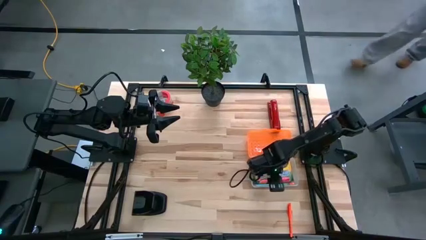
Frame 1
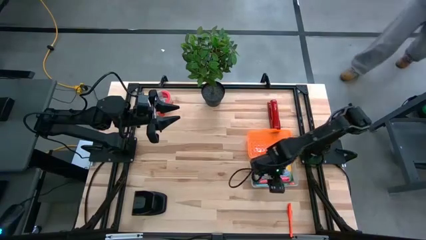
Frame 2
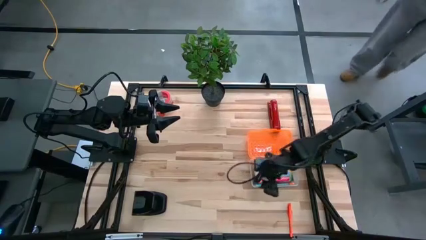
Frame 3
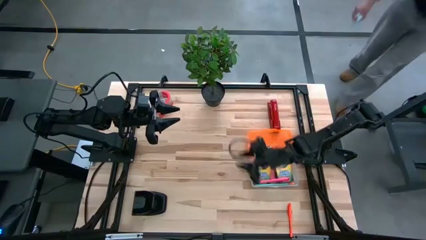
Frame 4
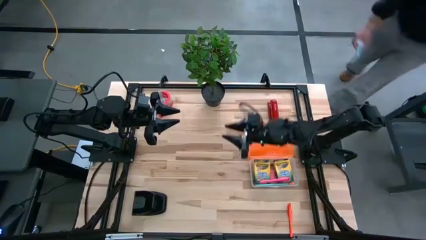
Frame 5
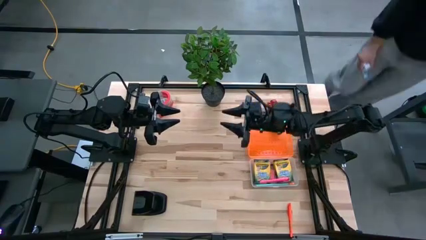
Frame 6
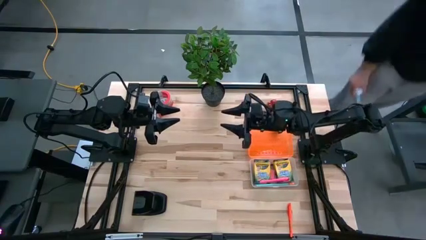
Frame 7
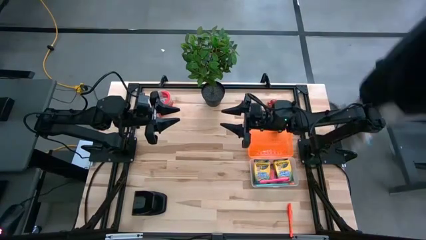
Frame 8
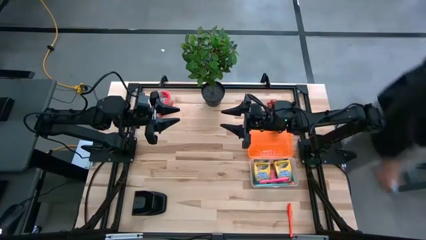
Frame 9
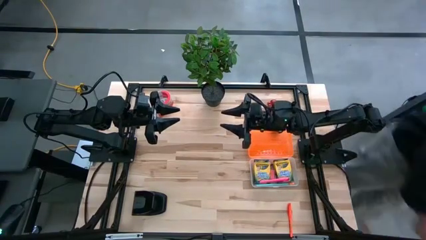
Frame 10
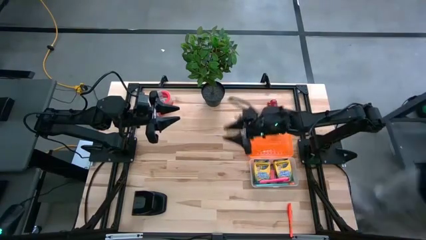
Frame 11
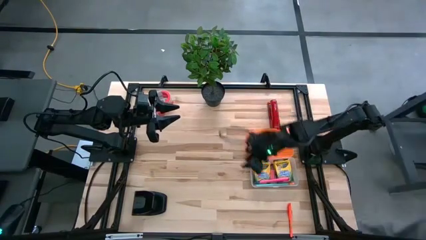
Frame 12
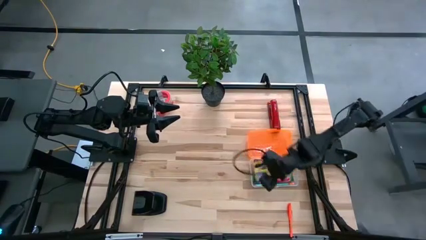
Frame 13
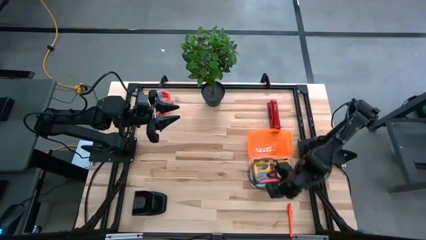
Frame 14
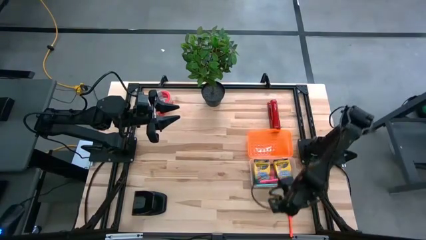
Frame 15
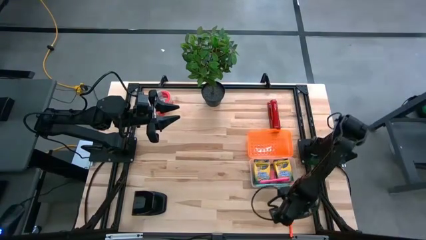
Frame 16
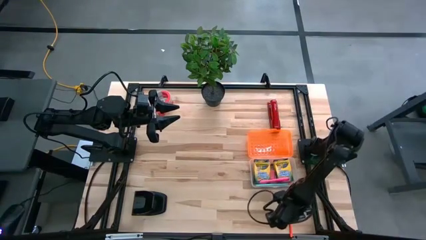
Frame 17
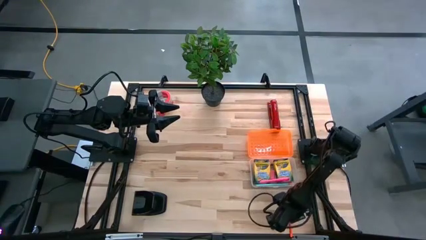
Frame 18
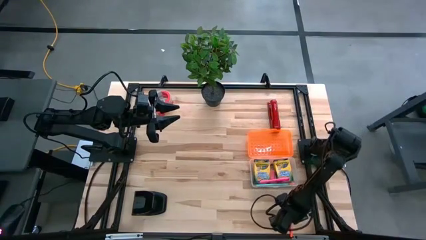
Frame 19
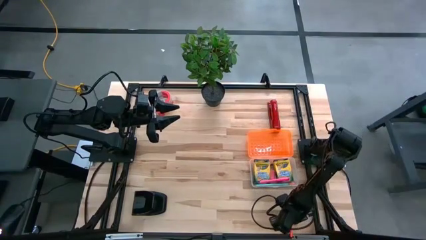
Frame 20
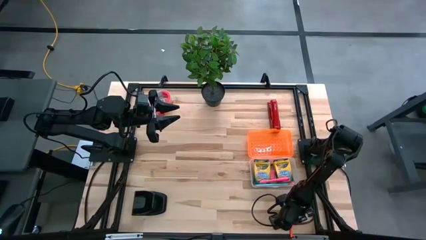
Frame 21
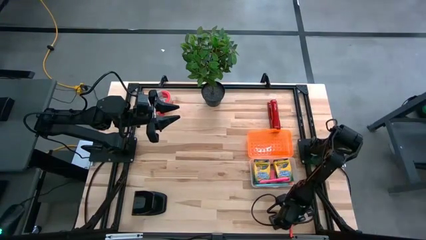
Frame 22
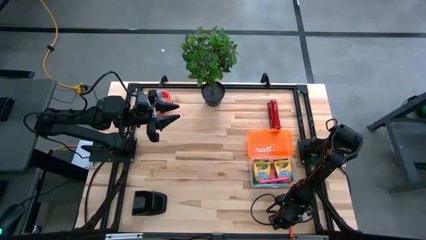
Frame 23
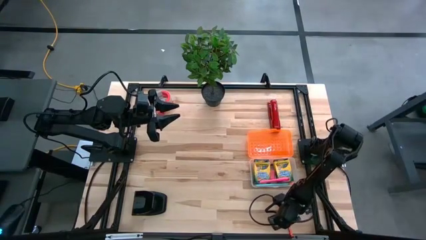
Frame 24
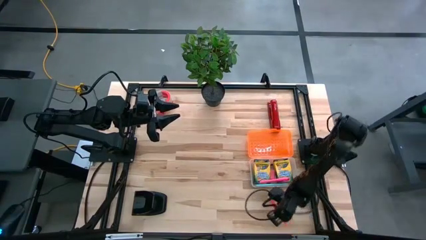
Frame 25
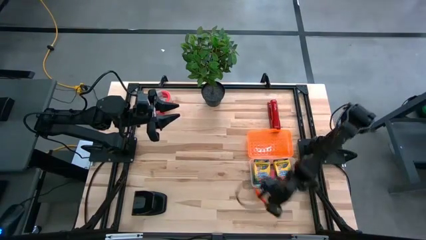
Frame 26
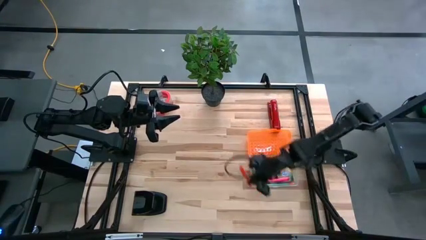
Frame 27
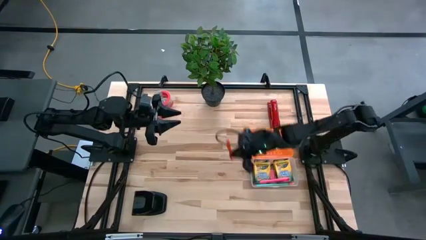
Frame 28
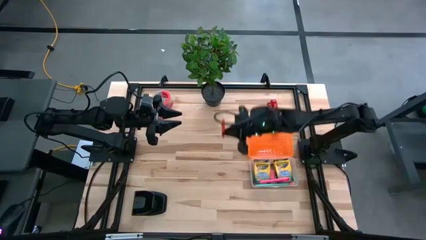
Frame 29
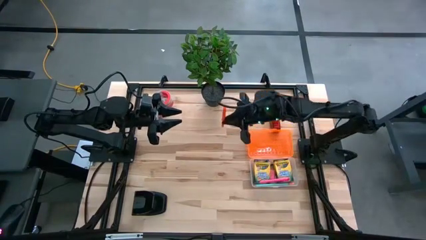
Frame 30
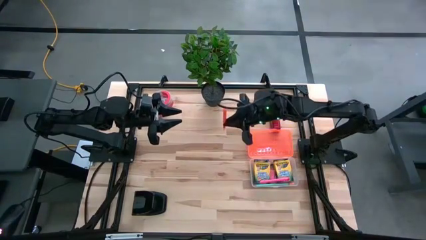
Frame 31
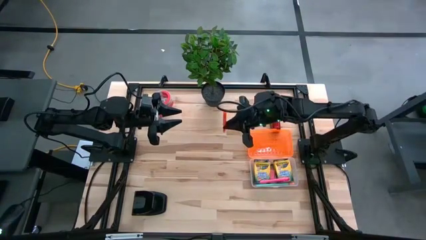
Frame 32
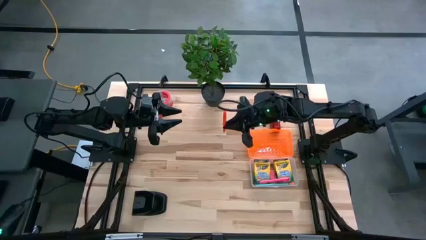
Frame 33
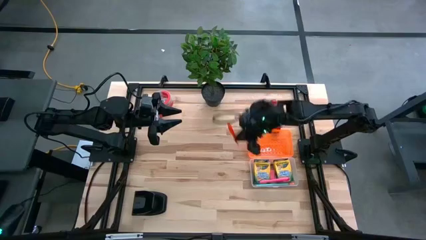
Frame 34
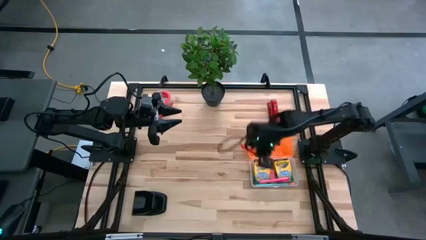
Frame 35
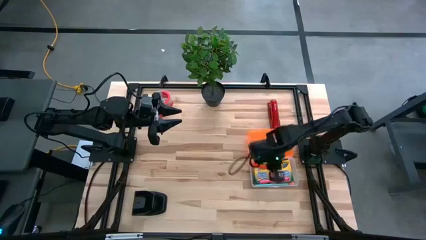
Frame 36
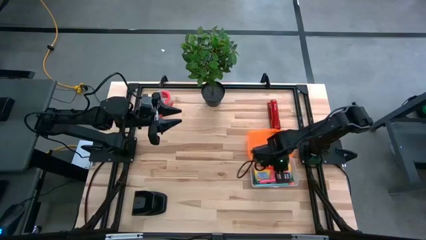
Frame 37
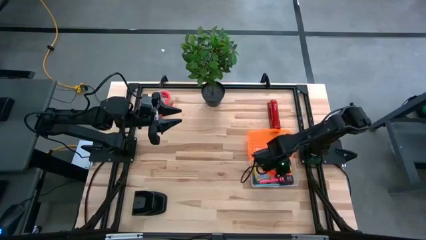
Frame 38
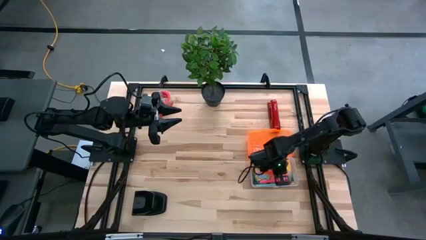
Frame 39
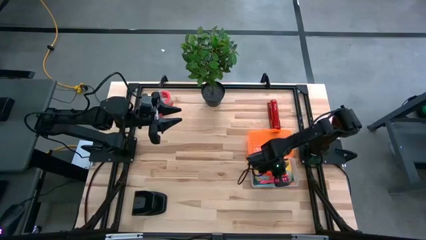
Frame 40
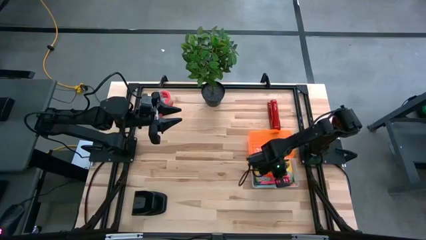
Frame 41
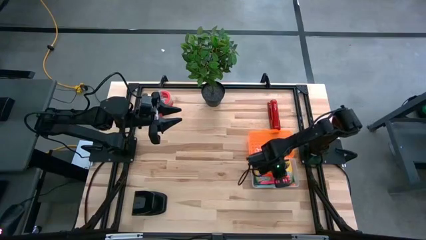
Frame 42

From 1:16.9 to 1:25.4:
Task: Pack school essentials
Put the orange pen into the orange supply box

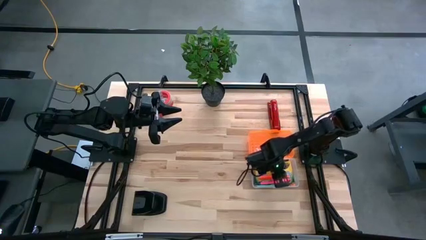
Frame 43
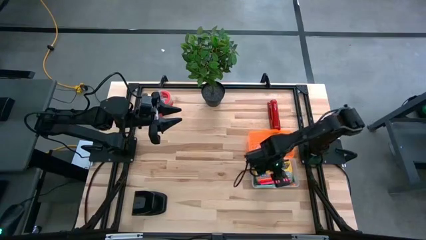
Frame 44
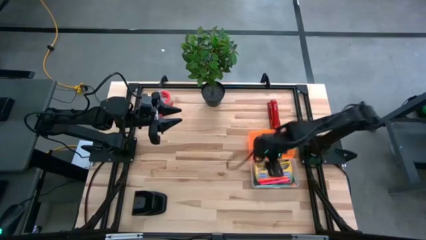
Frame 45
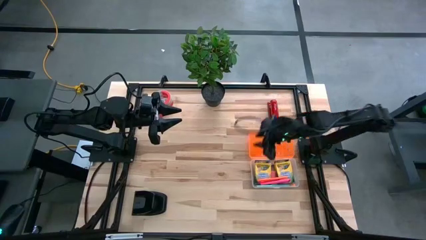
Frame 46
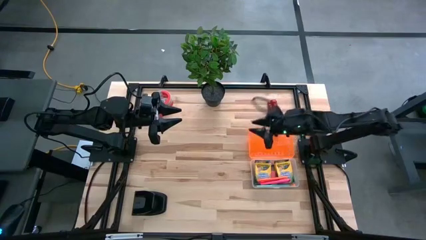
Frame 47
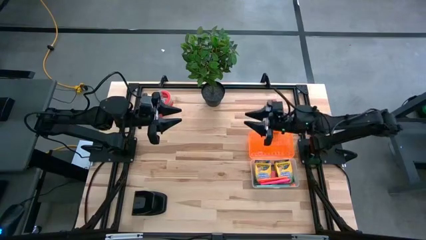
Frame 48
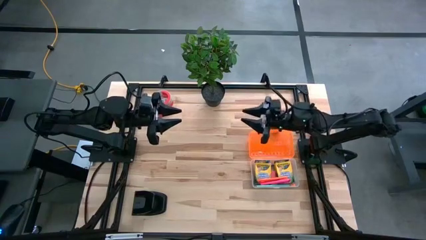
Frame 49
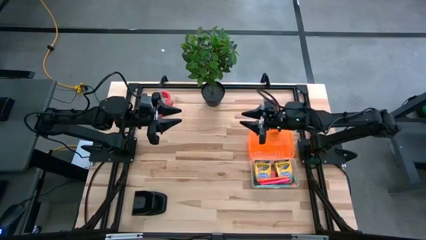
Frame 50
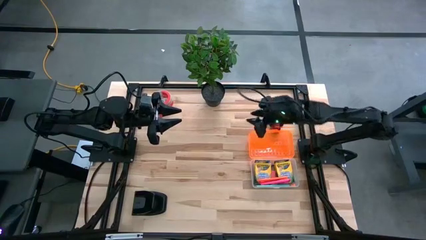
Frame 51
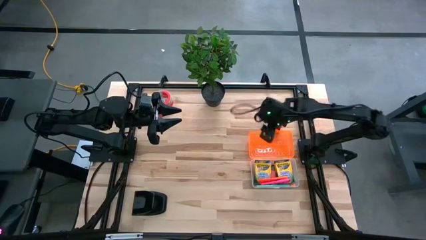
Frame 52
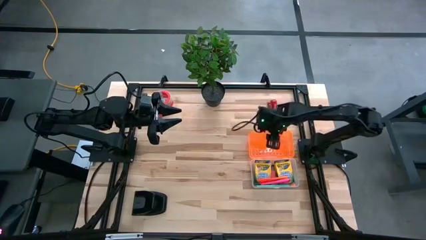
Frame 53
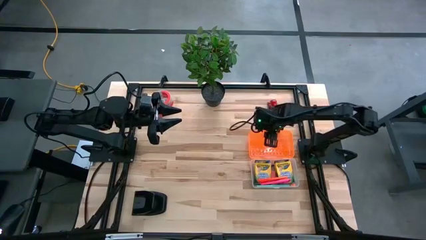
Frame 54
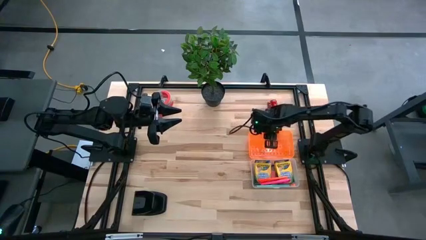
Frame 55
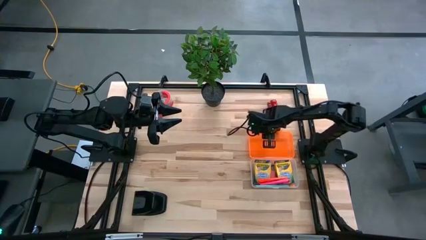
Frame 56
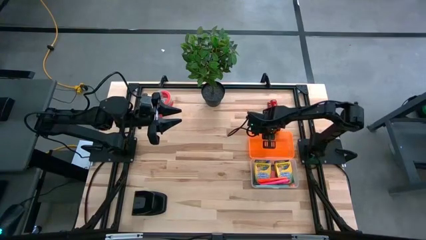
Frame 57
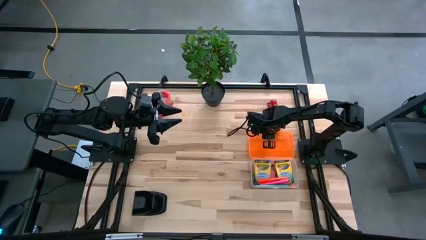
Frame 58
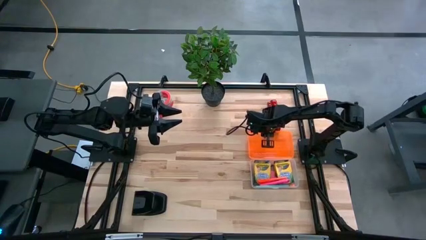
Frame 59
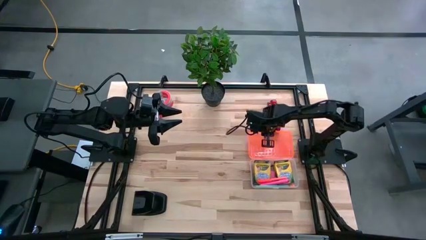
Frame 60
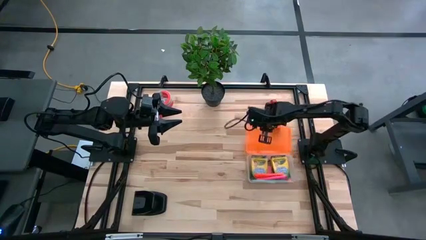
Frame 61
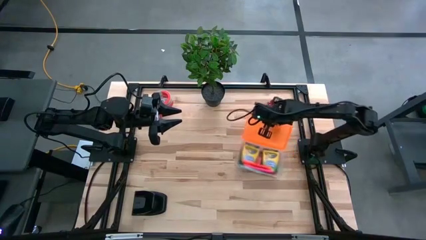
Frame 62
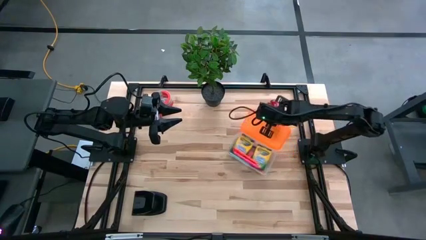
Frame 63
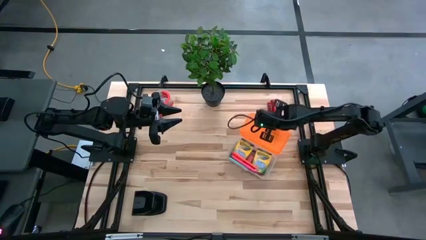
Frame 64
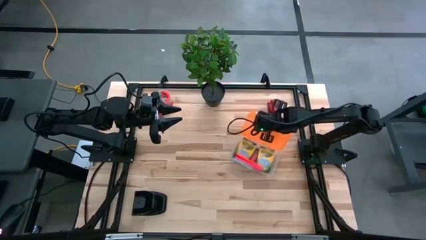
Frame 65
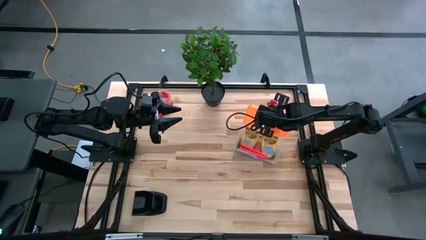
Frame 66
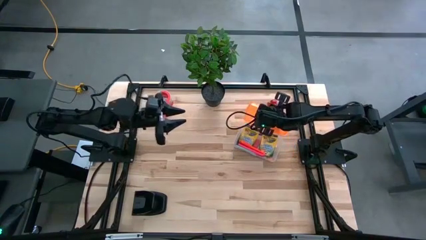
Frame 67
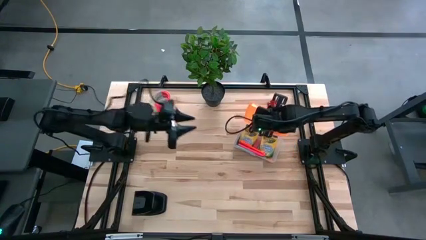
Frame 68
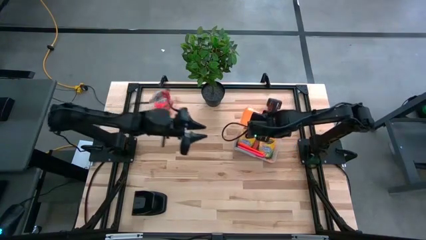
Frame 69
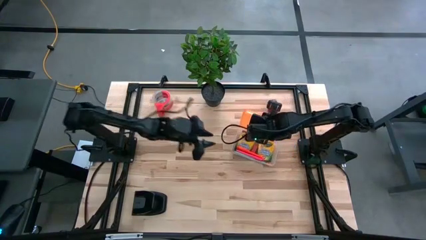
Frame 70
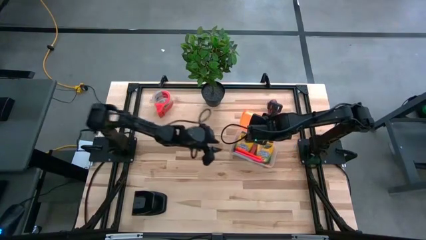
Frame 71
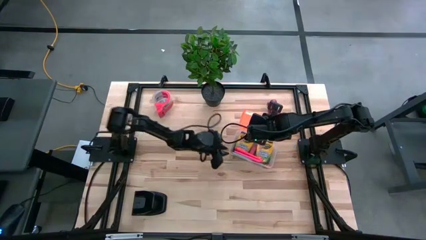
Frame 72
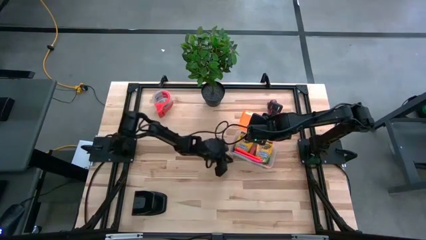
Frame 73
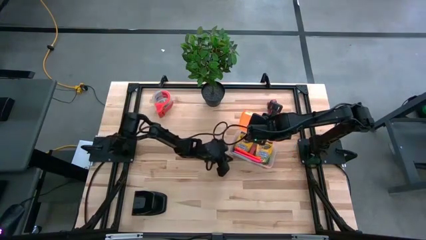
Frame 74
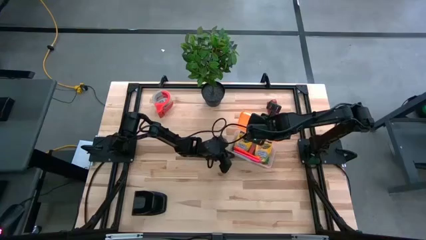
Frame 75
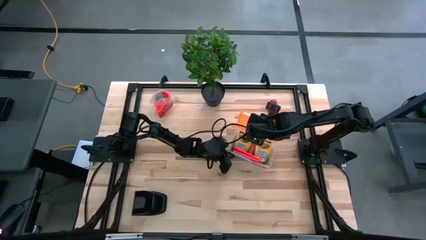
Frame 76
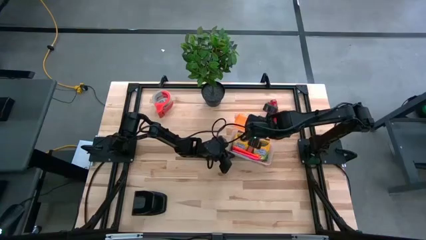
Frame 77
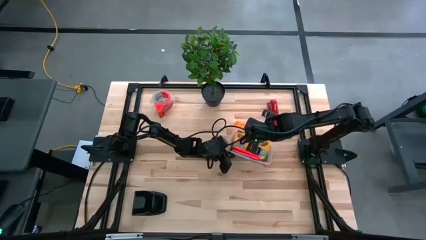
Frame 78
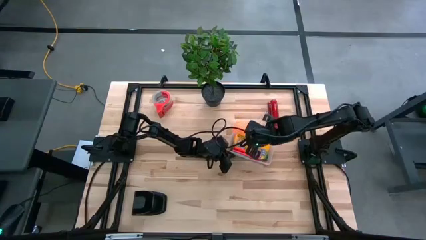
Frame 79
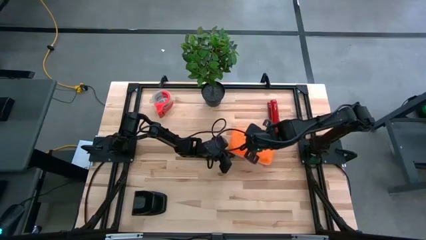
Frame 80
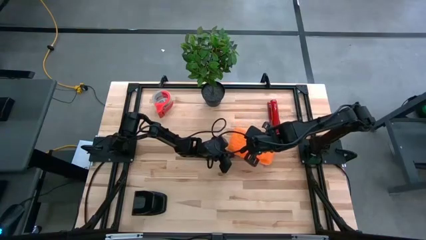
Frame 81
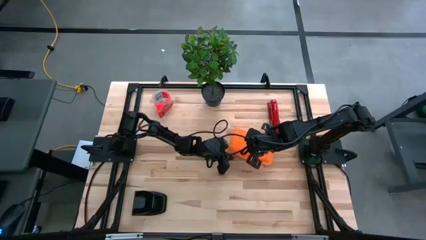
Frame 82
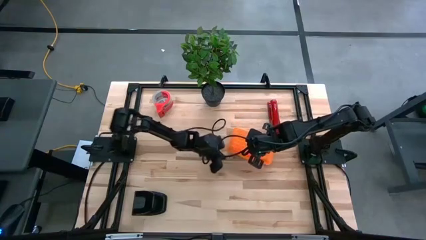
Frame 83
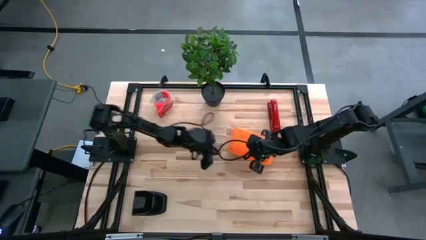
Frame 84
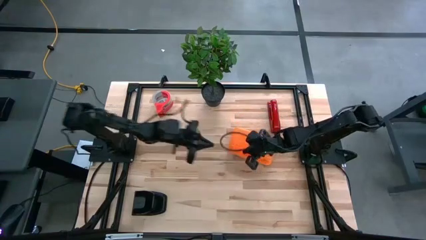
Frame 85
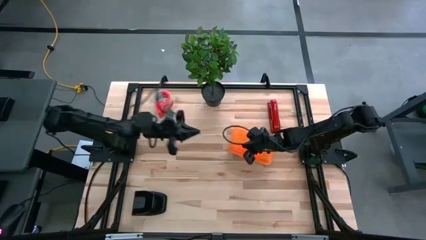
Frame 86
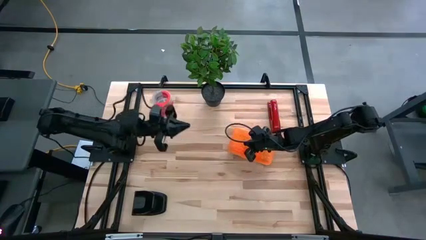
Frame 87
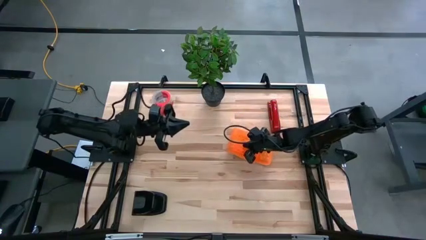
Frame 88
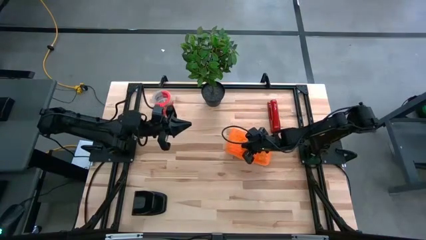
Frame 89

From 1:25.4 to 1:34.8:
Close the orange supply box

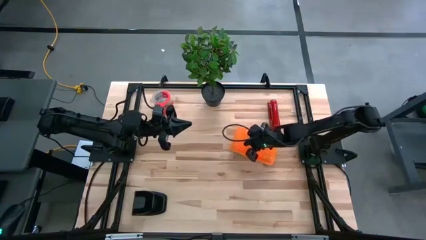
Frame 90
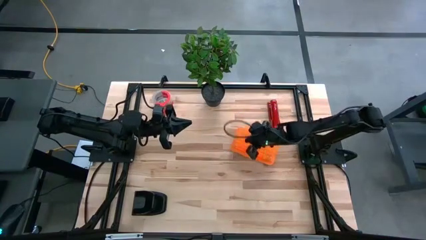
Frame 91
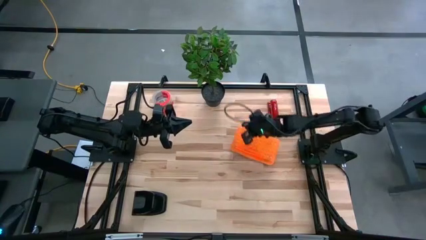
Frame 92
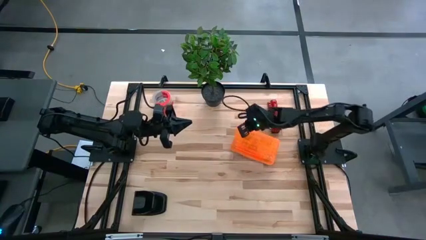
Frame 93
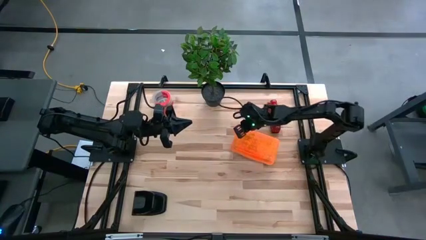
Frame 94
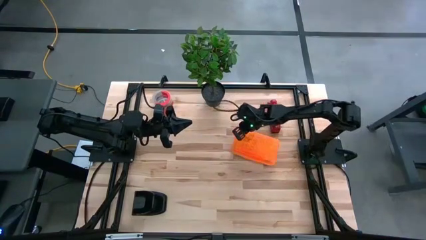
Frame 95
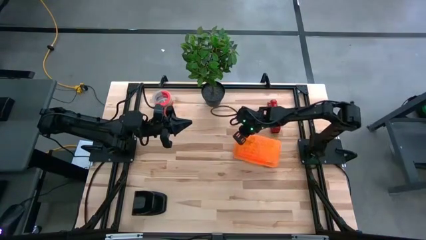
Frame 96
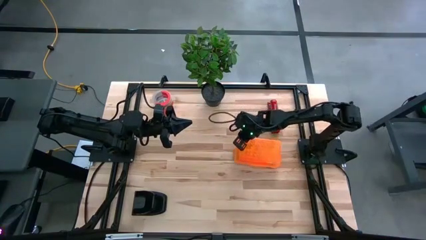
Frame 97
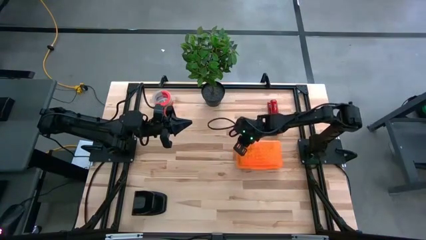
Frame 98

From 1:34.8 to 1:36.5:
Adjust the orange supply box
